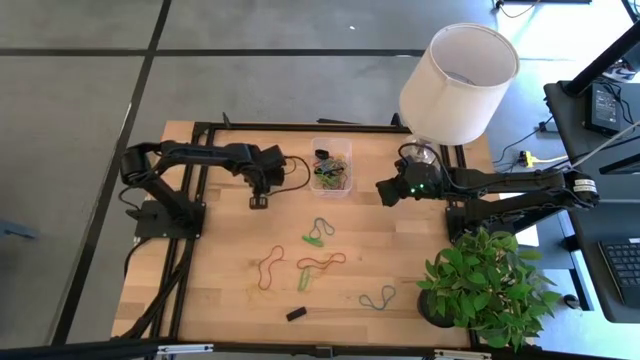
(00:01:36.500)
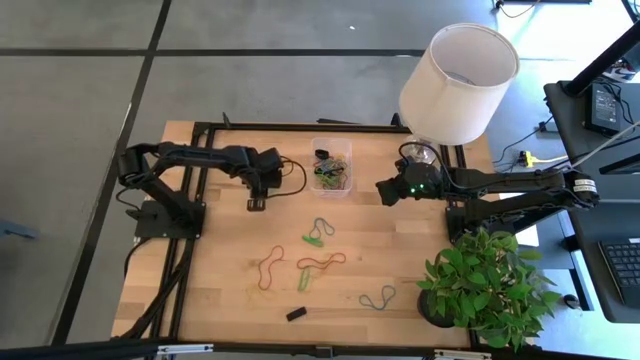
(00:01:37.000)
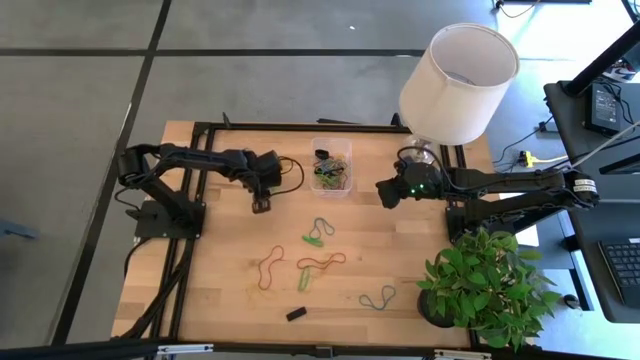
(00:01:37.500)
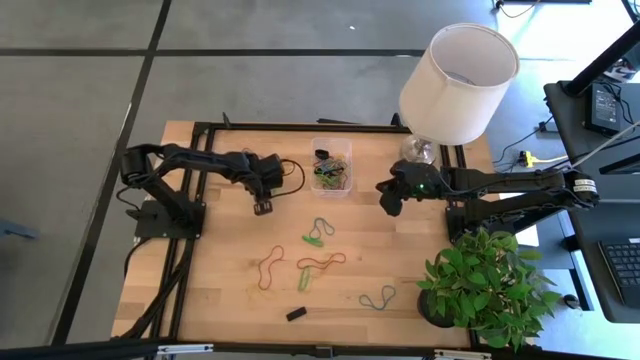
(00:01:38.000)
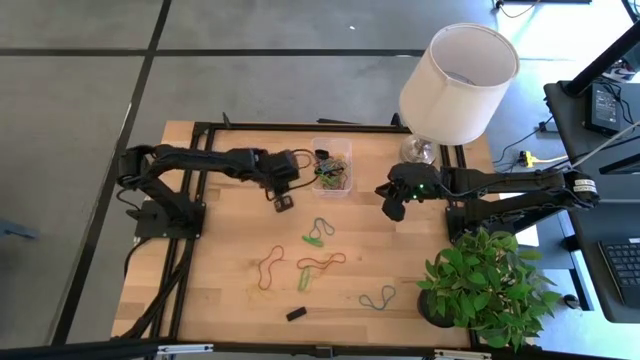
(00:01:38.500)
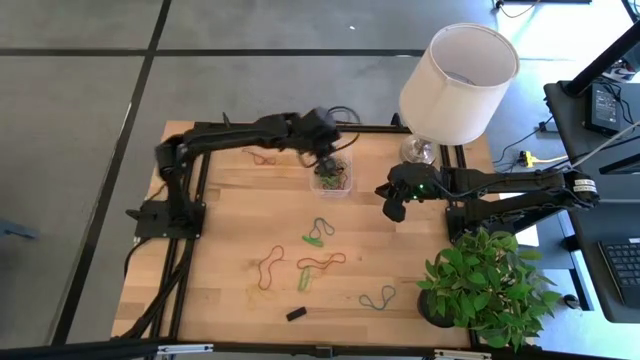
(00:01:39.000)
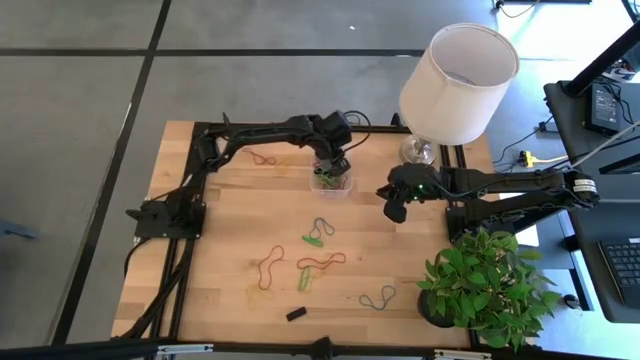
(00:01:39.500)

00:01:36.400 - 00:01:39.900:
Task: Pick and place rubber bands into bin
Put the green rubber band into the transparent bin

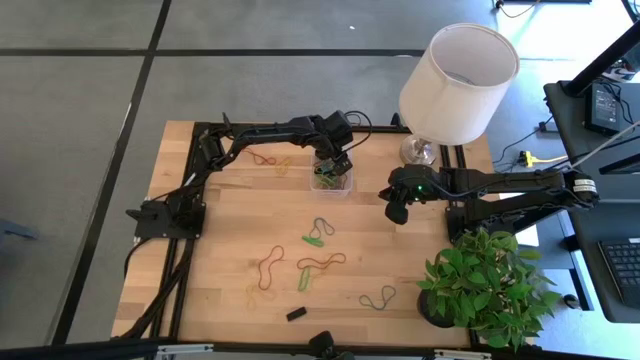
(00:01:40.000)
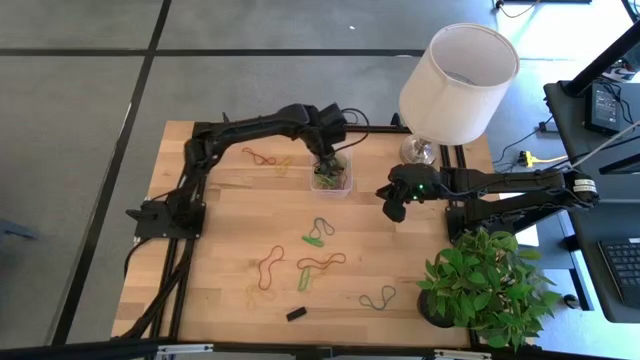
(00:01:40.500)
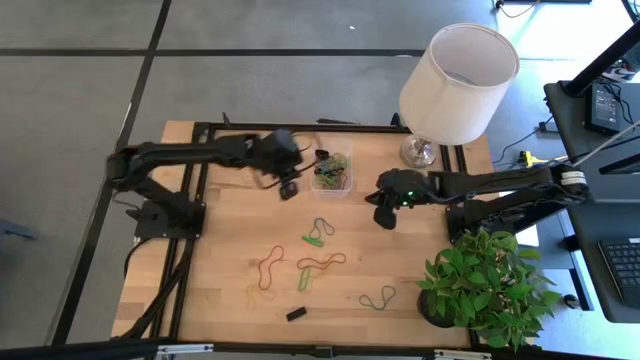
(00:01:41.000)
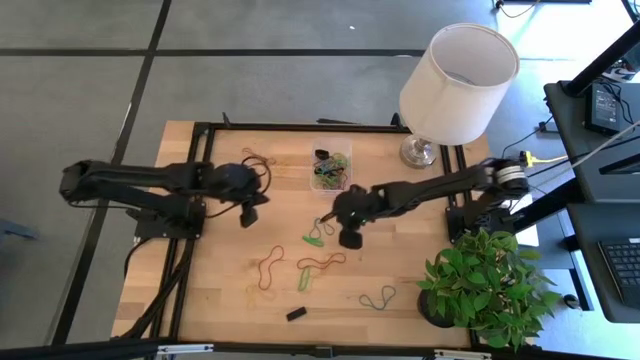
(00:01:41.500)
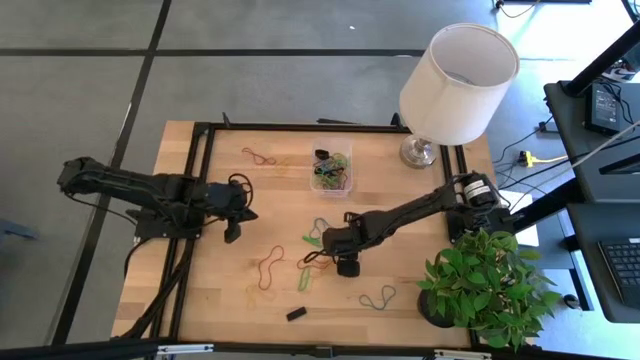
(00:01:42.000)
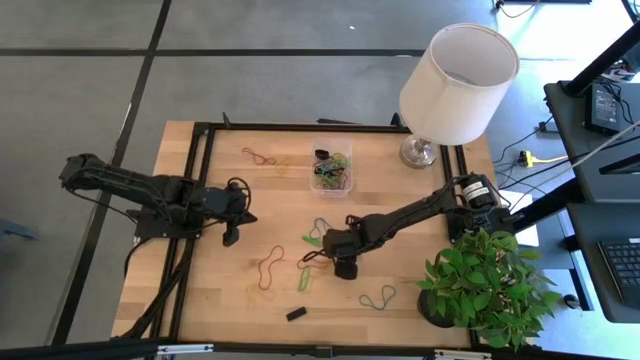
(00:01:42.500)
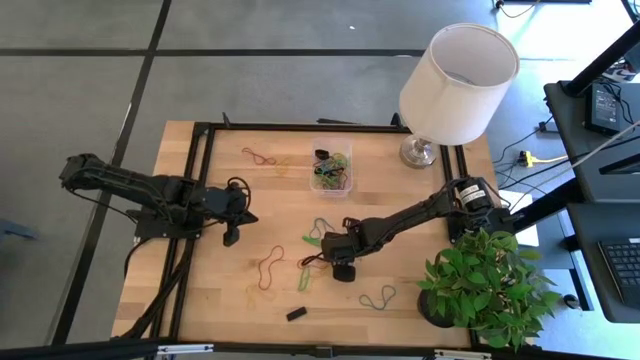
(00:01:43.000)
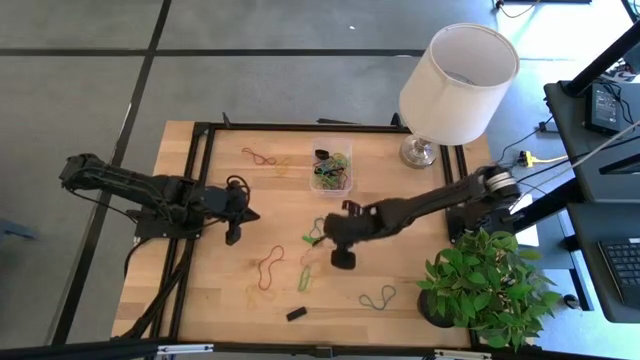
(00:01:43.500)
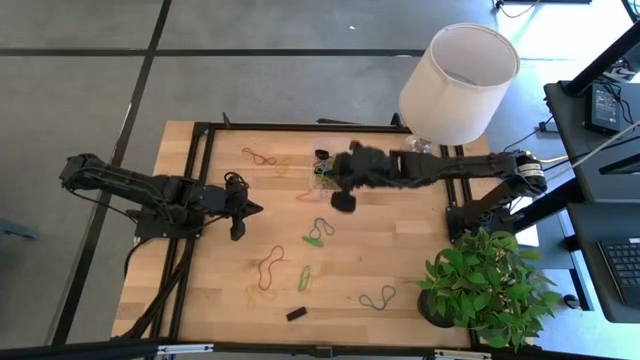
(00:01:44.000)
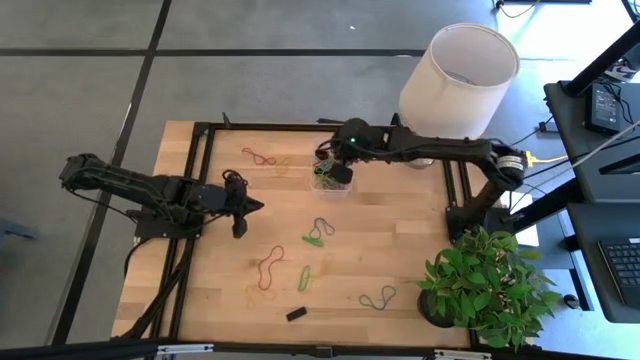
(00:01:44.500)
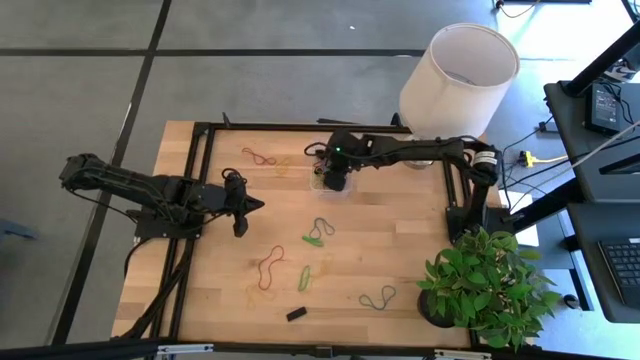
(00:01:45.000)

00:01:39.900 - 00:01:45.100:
Put the red rubber band into the transparent bin

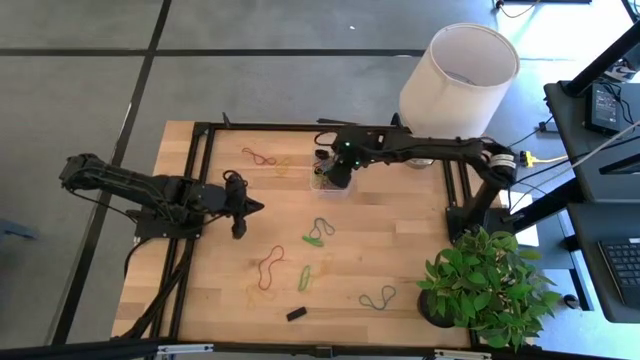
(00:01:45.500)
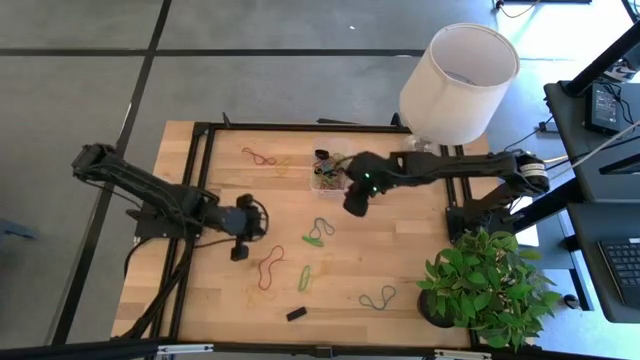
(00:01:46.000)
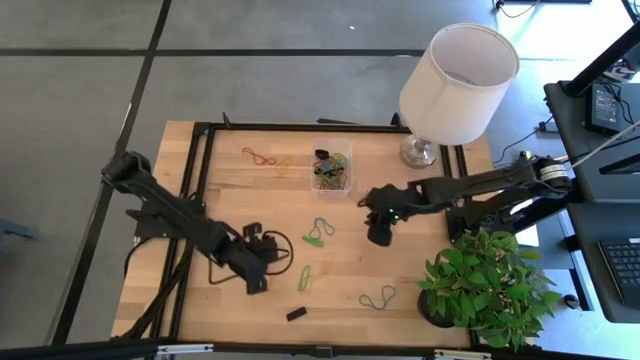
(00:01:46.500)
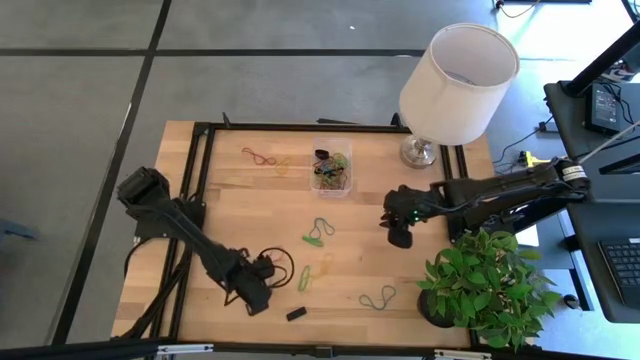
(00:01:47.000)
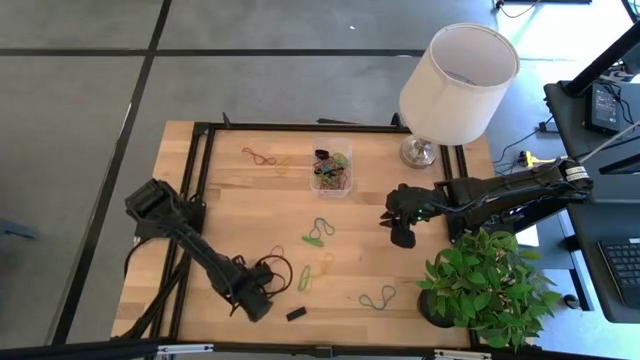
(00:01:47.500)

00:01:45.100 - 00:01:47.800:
Put the yellow rubber band into the transparent bin

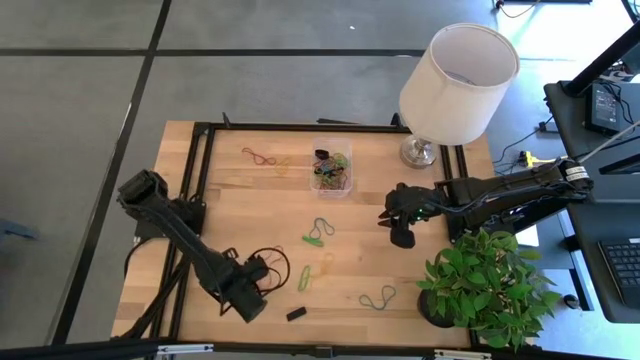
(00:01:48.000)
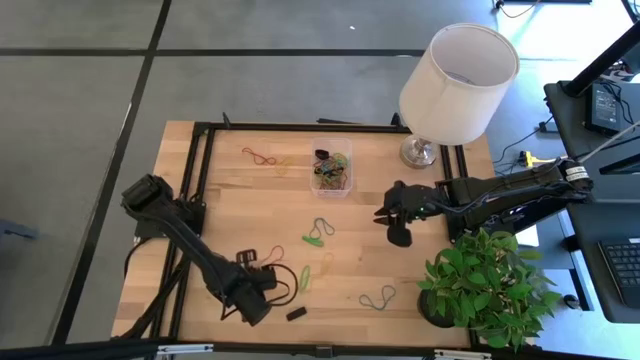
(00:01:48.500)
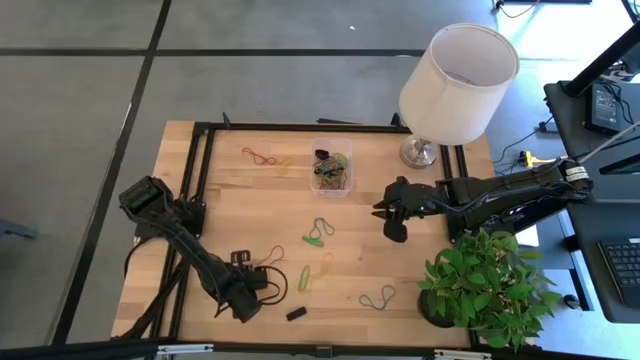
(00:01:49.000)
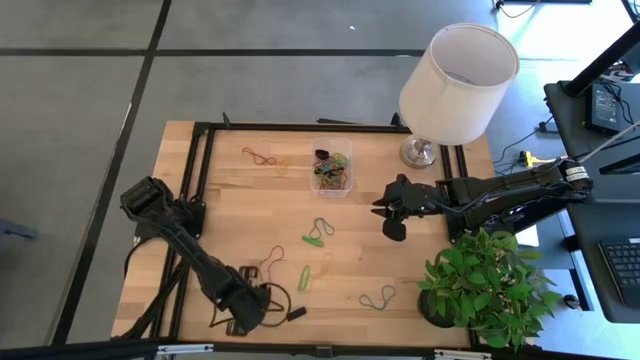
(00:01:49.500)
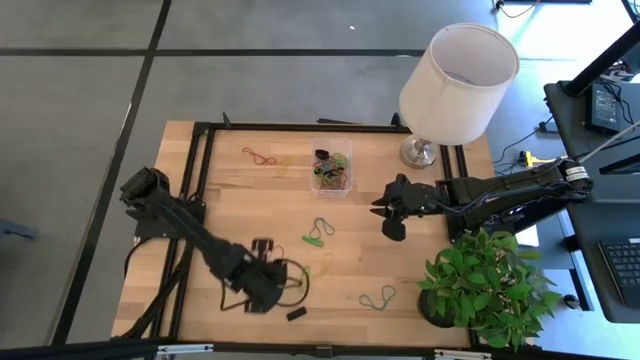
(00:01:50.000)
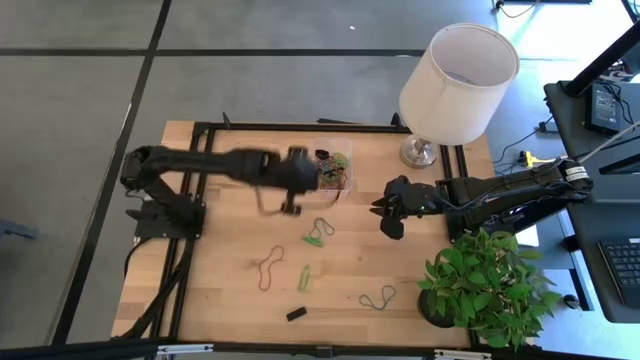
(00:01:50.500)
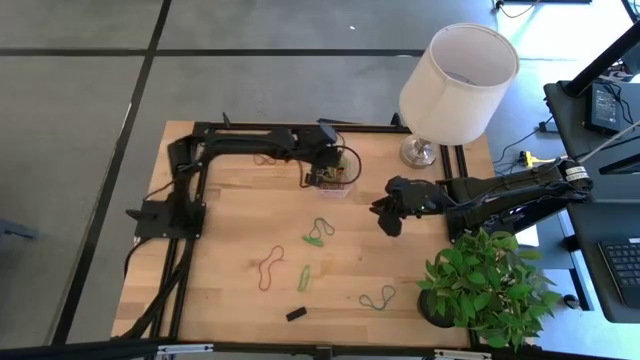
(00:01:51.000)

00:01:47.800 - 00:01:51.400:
Put the yellow rubber band into the transparent bin

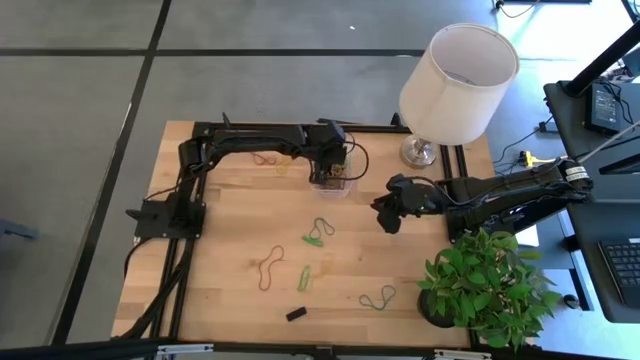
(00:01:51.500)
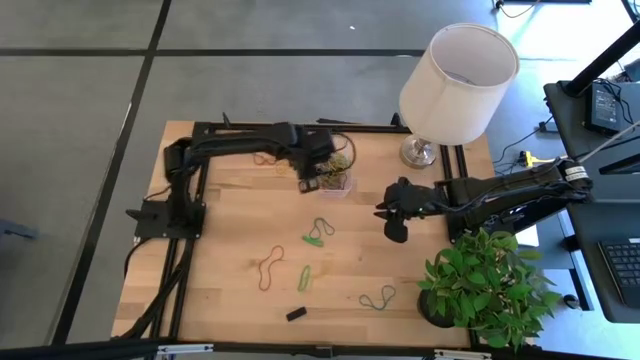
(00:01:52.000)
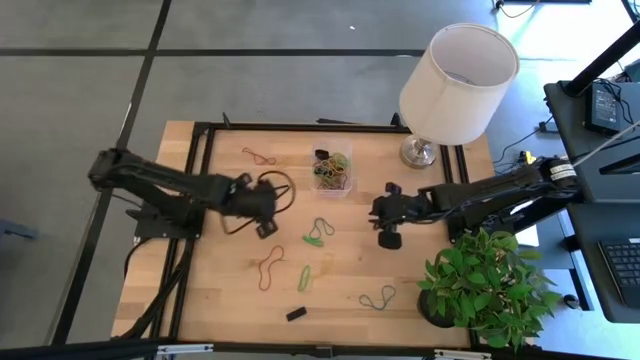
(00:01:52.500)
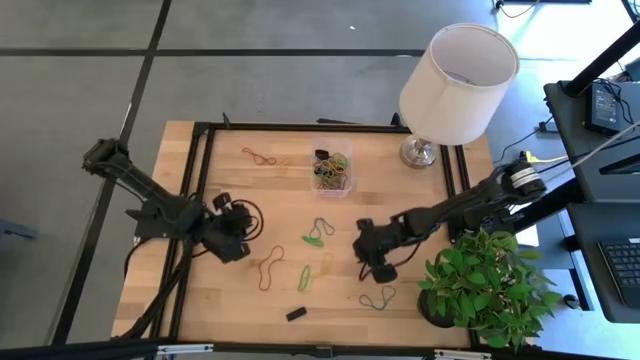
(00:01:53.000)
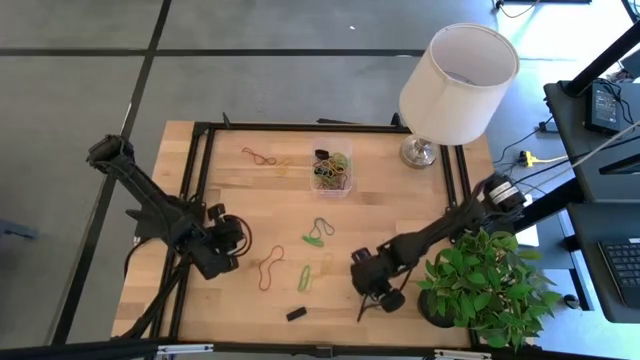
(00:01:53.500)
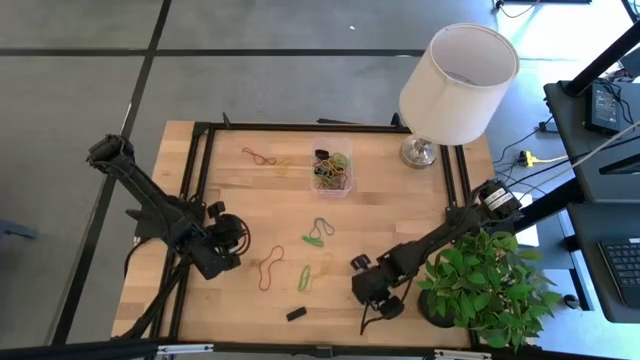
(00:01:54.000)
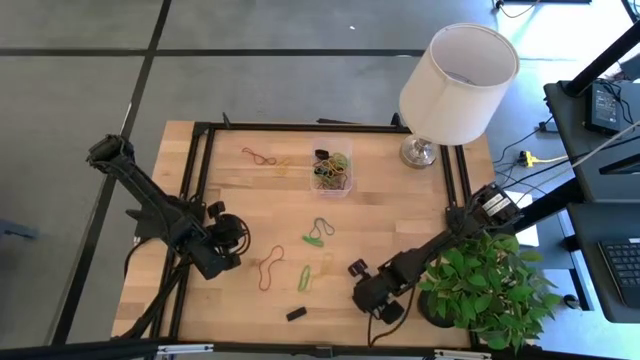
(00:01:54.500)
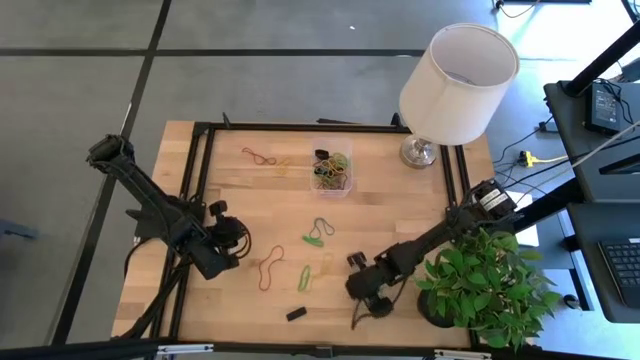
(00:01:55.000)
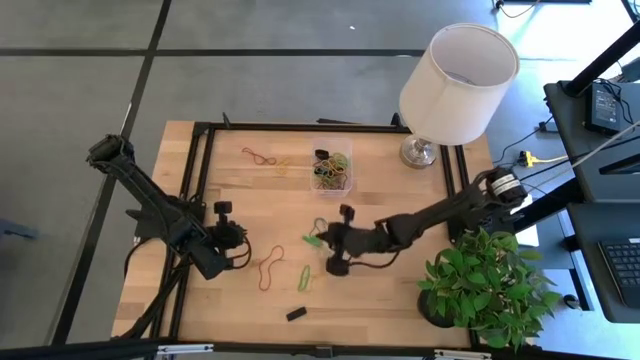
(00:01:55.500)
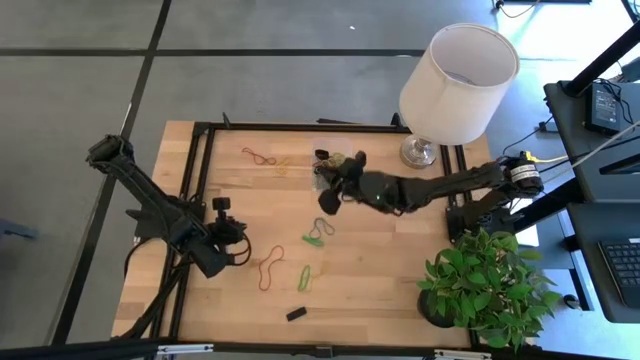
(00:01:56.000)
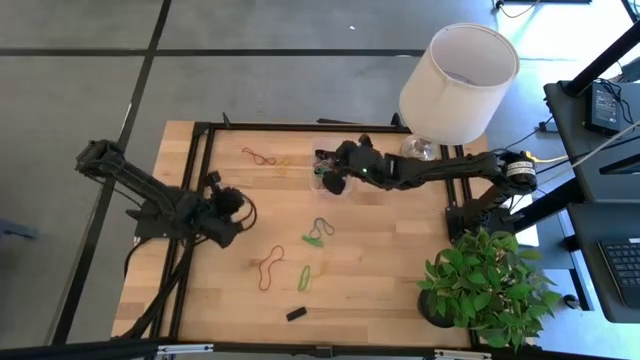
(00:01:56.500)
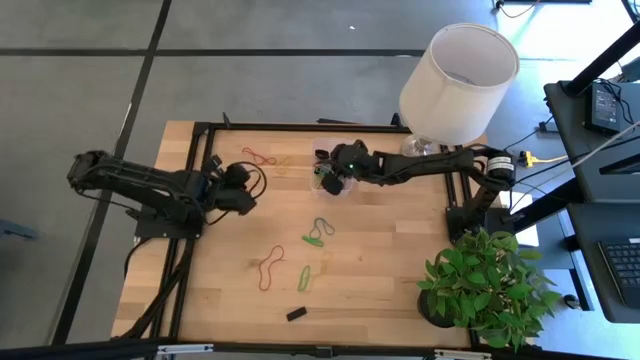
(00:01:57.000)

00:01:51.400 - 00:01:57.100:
Put the blue rubber band into the transparent bin
